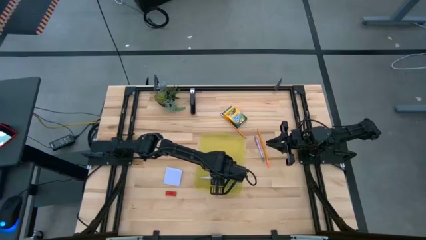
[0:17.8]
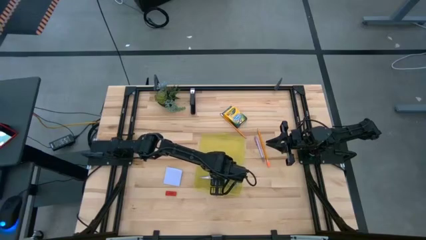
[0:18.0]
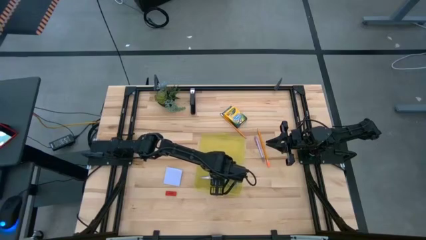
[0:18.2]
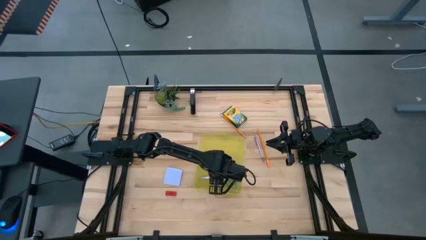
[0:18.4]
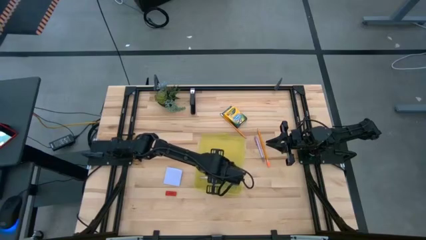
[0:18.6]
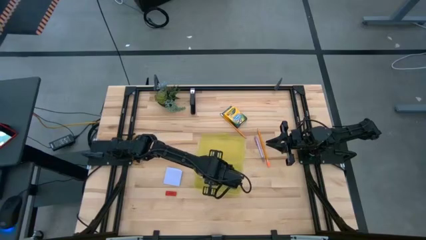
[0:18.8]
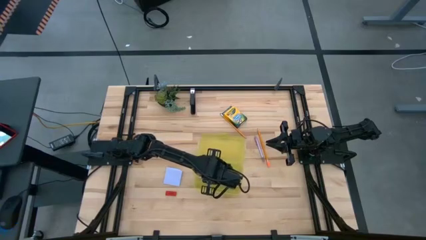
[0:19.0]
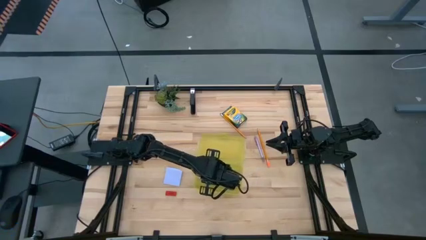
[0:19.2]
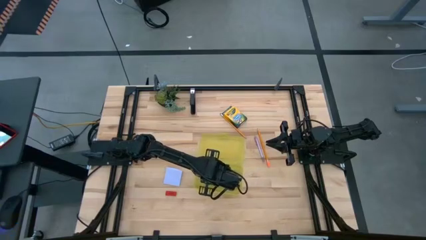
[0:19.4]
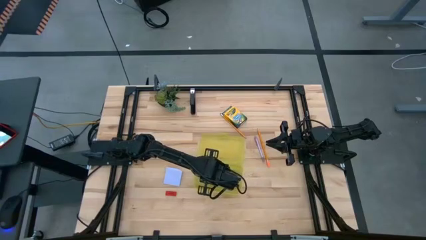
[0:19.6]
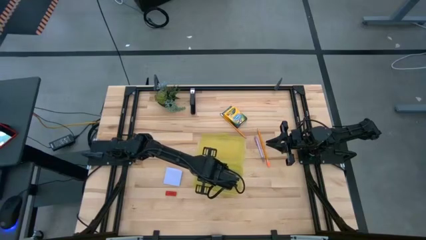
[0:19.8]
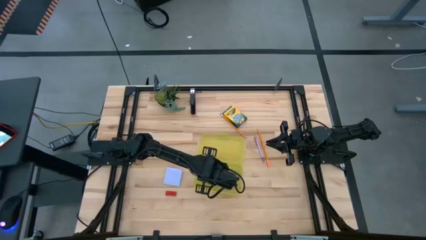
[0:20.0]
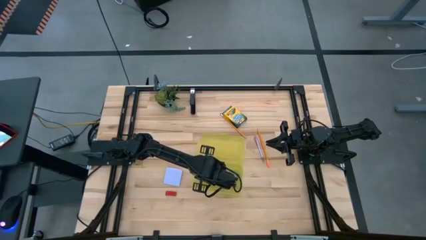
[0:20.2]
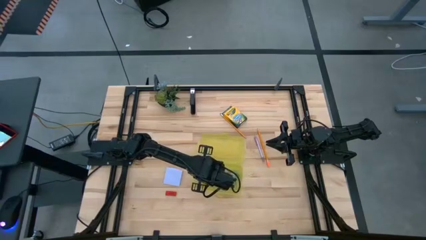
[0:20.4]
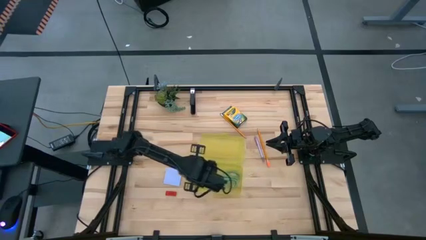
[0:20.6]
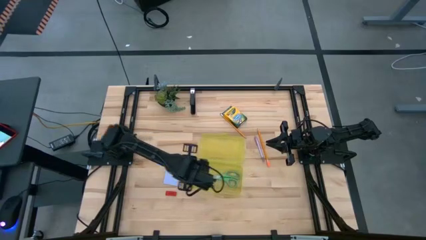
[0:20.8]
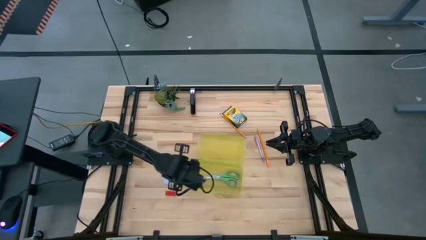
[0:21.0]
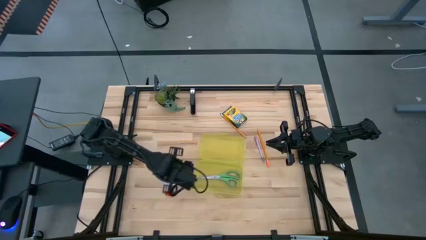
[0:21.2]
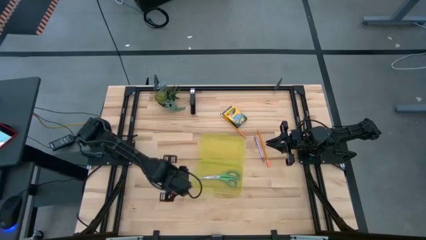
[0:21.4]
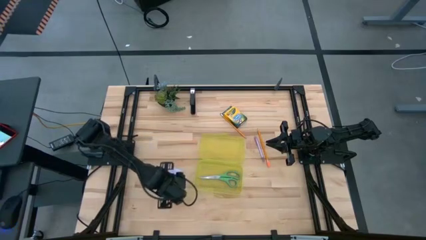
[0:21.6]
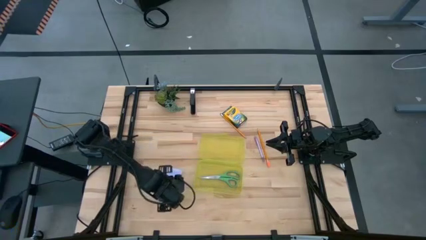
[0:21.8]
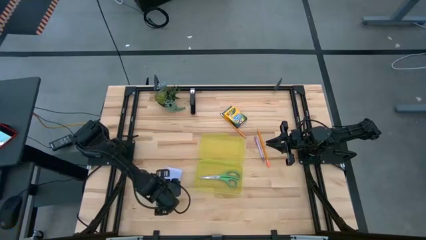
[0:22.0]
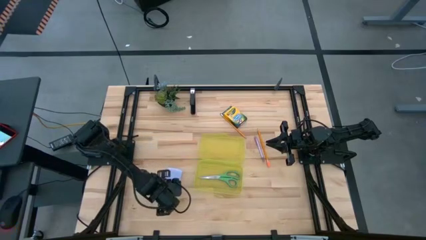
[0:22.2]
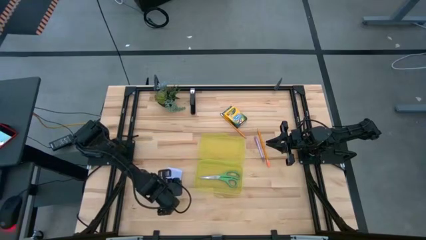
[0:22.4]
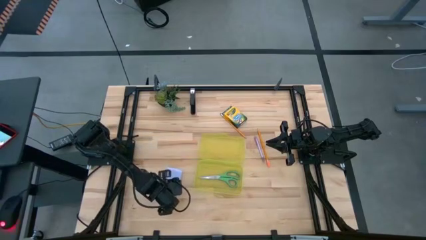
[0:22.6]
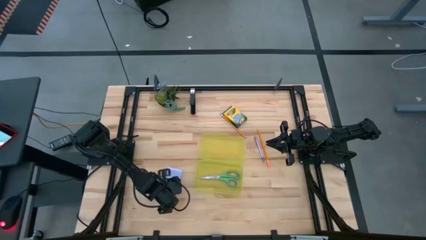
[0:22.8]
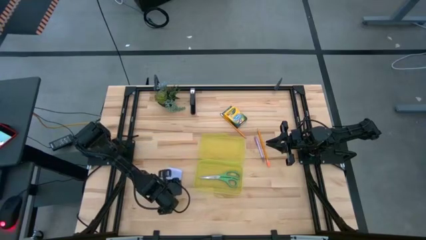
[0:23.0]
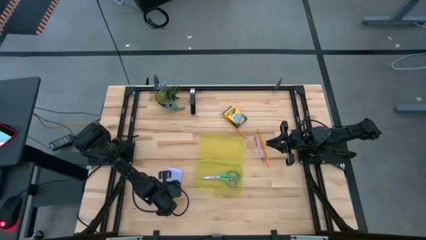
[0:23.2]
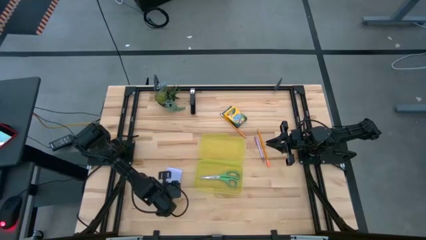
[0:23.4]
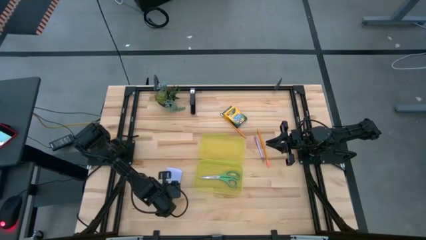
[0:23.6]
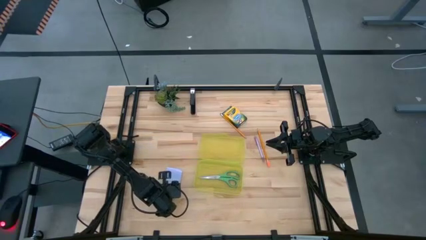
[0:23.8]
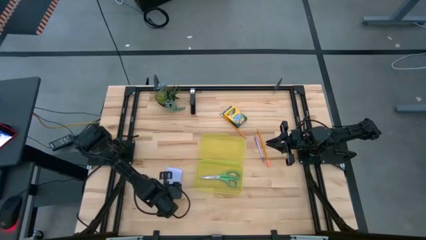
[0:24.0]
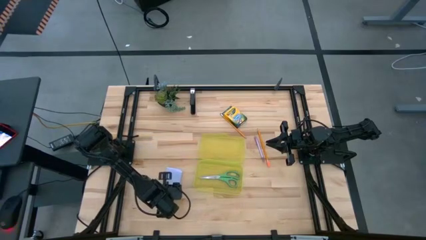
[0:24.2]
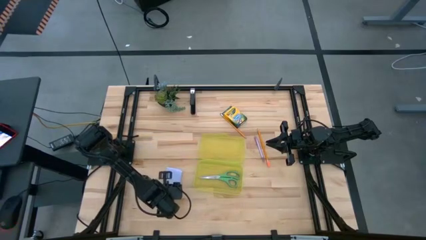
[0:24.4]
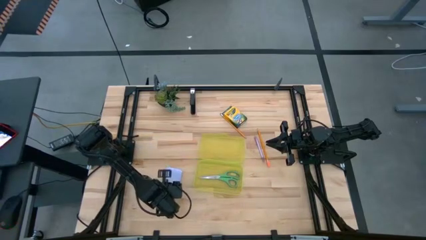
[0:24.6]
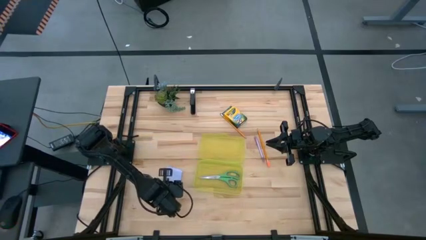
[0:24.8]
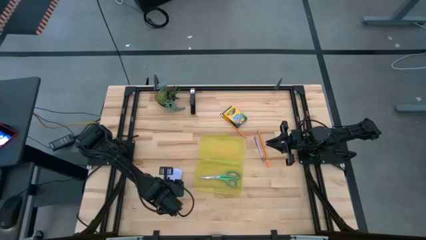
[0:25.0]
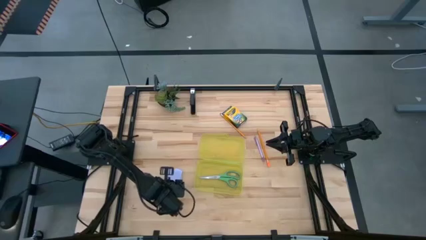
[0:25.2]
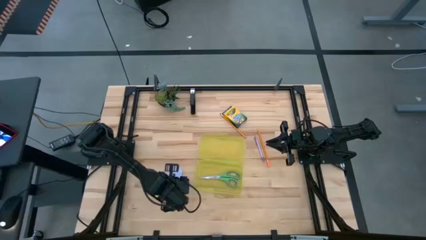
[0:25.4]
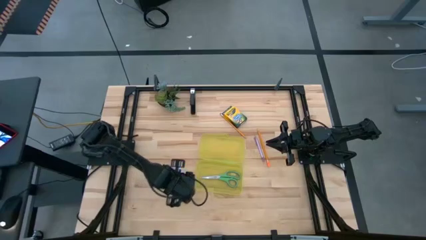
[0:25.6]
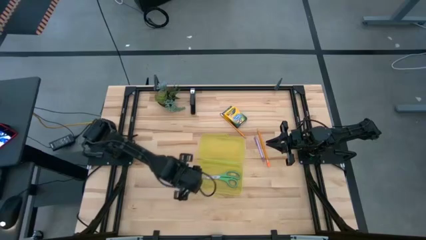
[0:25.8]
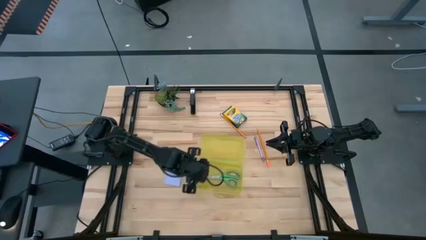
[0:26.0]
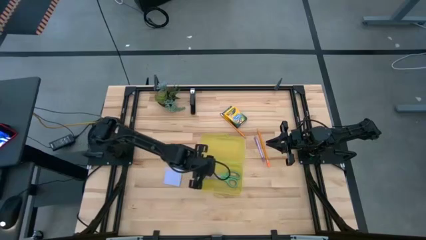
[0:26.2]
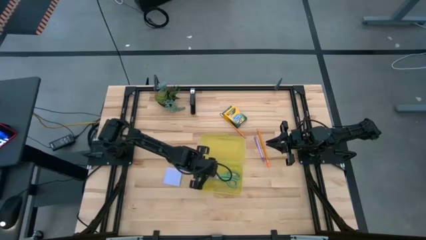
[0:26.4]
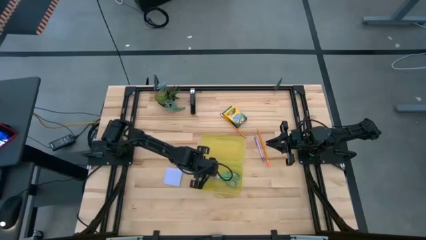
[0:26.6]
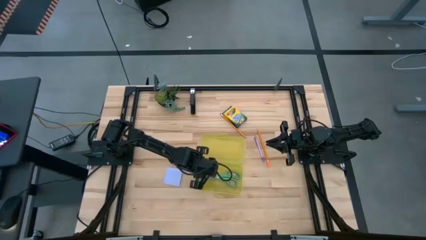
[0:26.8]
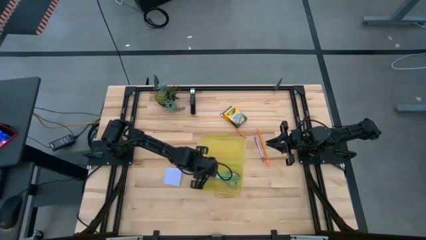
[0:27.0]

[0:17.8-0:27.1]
Task: Pack school essentials
Put the red eraser into the yellow supply box
